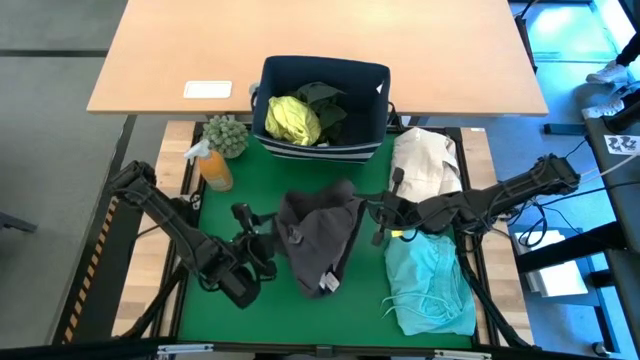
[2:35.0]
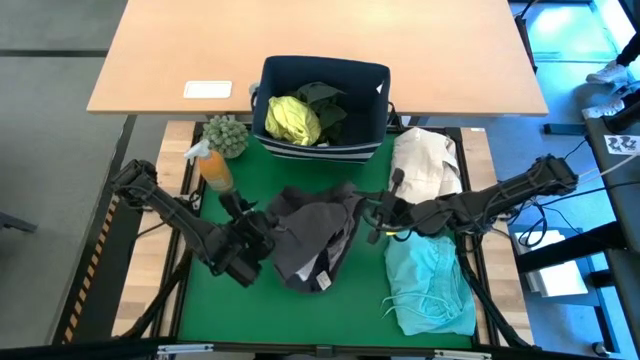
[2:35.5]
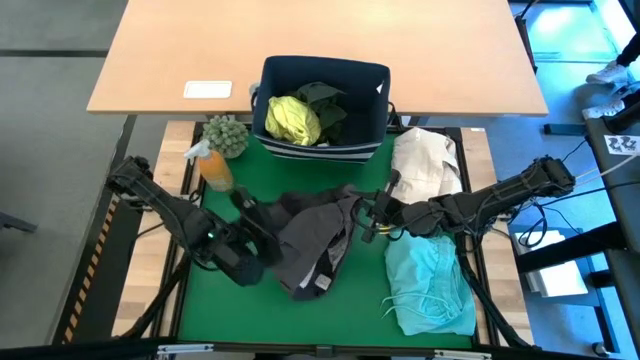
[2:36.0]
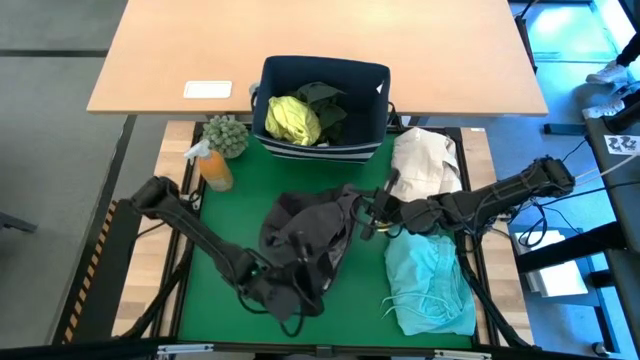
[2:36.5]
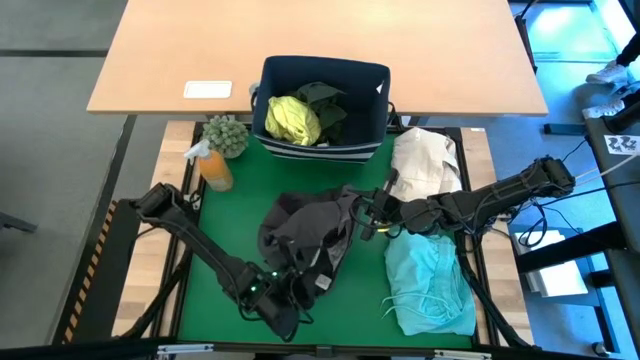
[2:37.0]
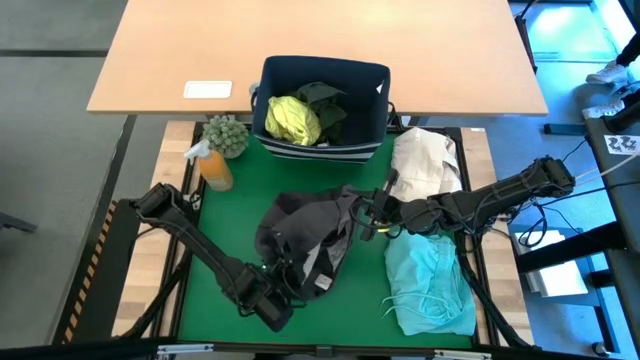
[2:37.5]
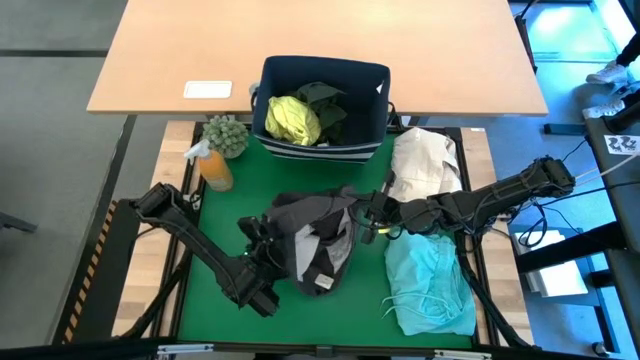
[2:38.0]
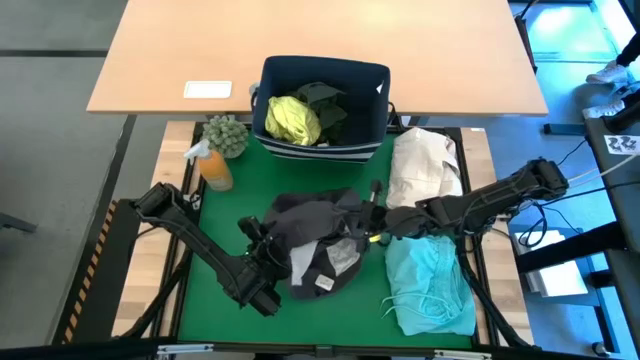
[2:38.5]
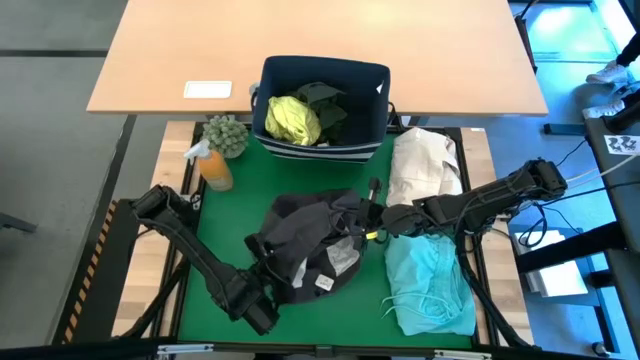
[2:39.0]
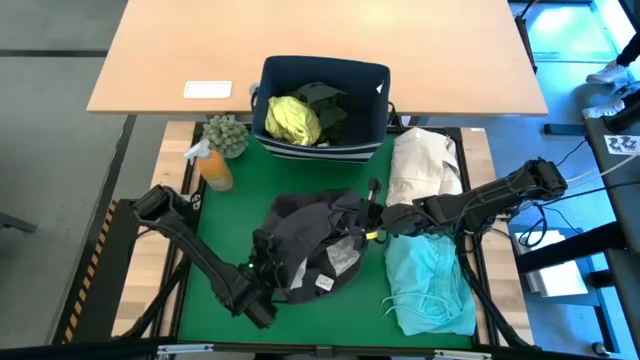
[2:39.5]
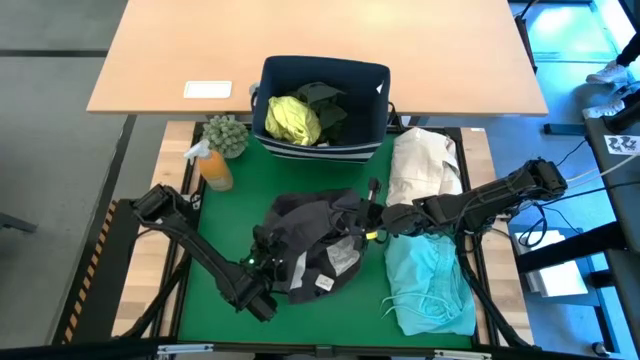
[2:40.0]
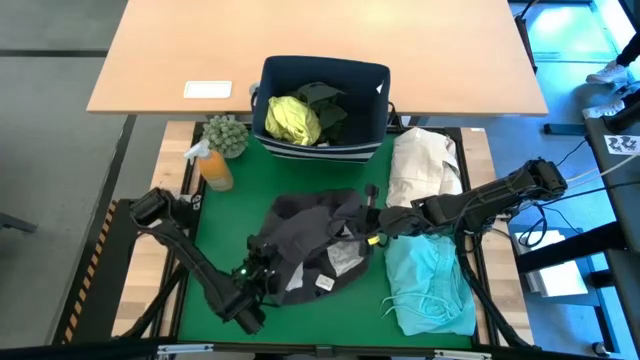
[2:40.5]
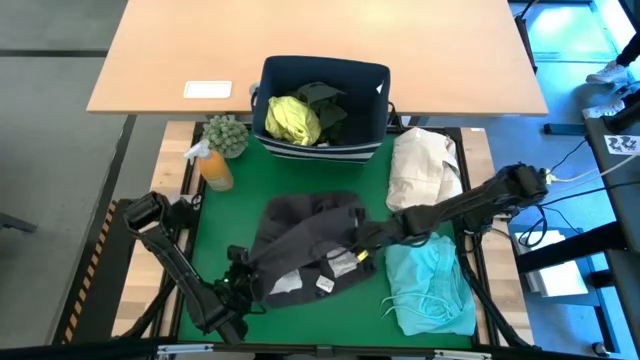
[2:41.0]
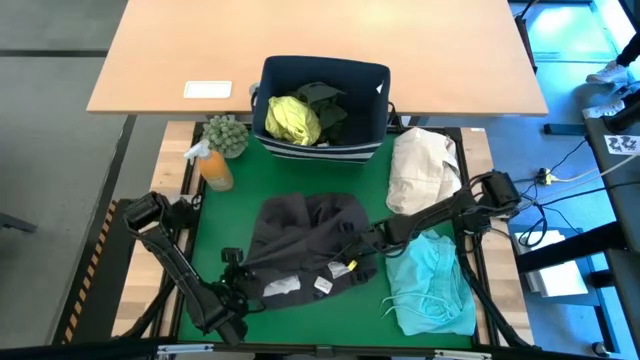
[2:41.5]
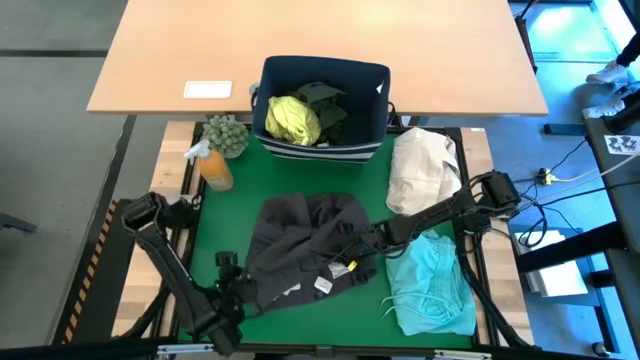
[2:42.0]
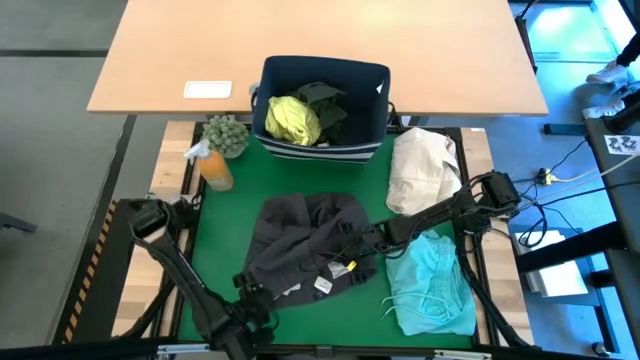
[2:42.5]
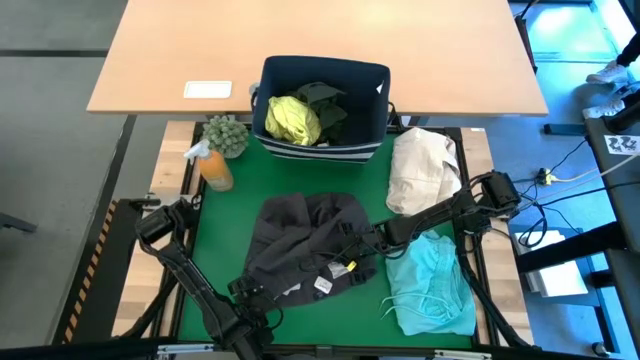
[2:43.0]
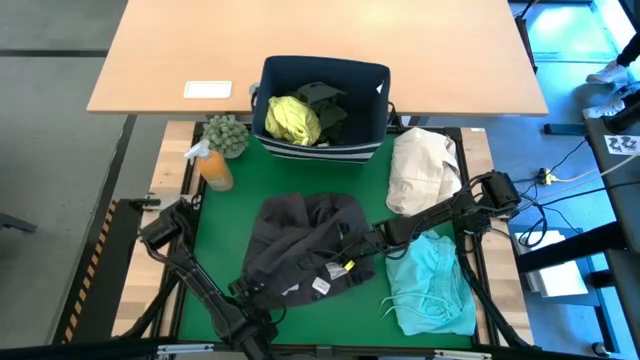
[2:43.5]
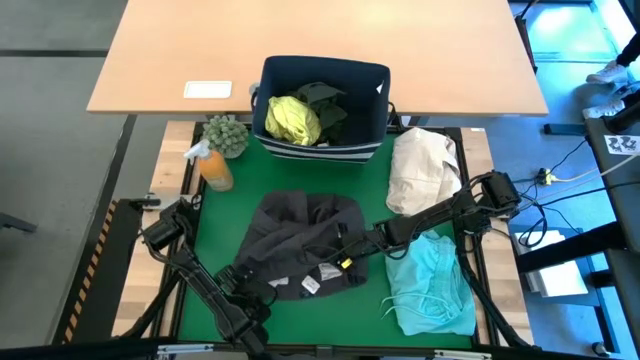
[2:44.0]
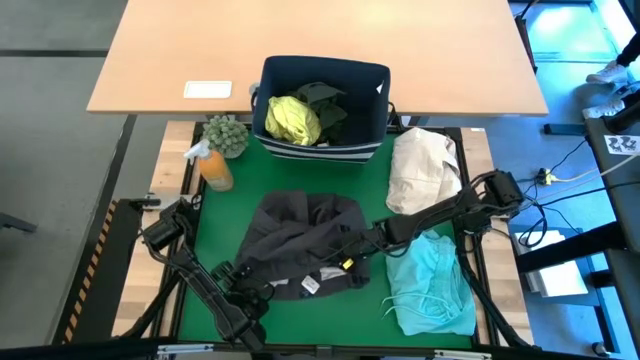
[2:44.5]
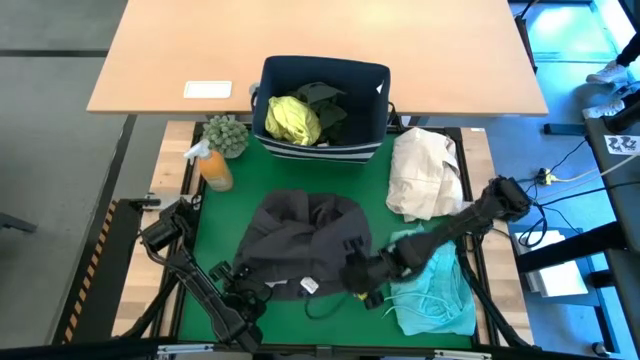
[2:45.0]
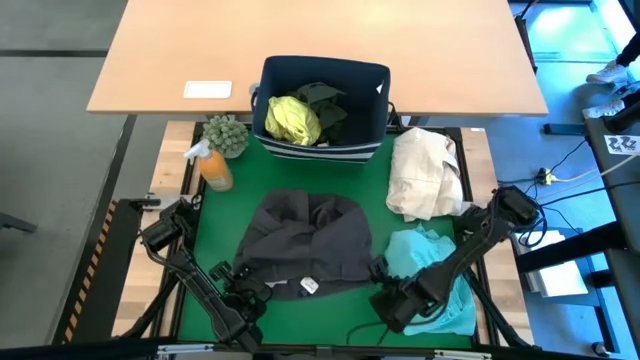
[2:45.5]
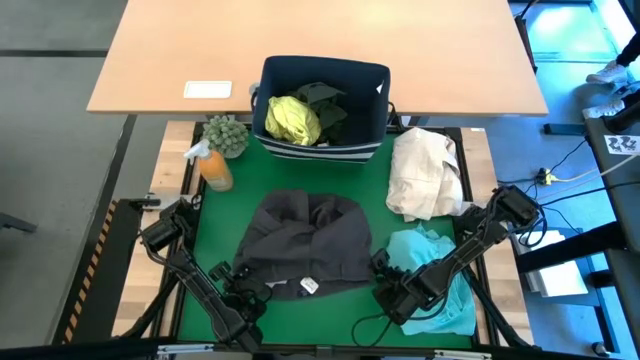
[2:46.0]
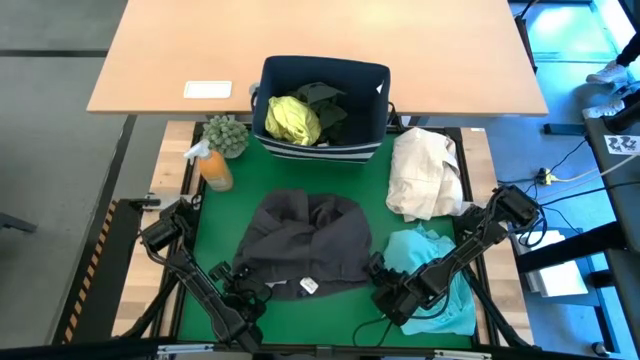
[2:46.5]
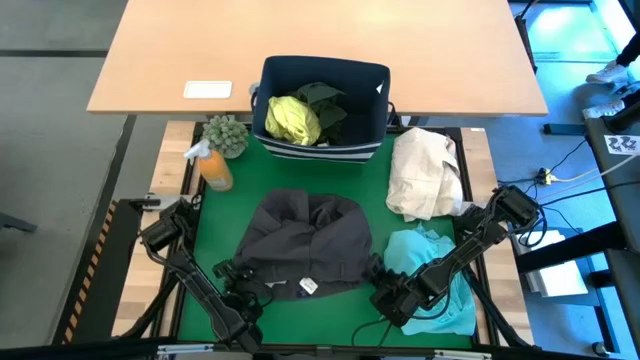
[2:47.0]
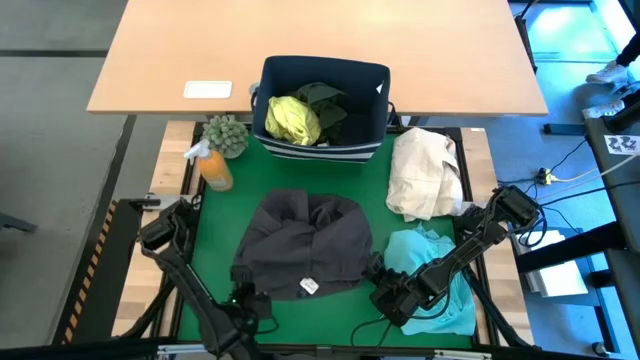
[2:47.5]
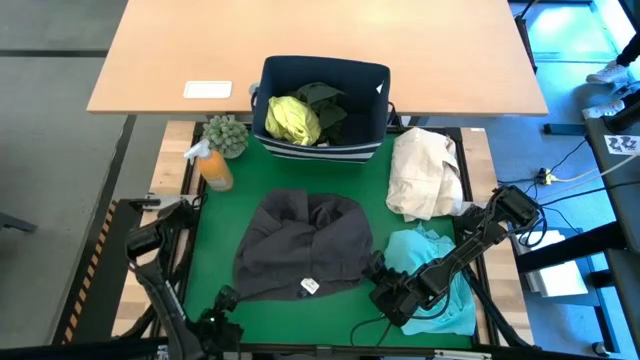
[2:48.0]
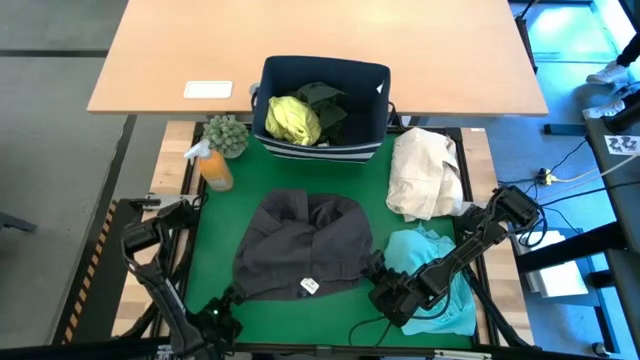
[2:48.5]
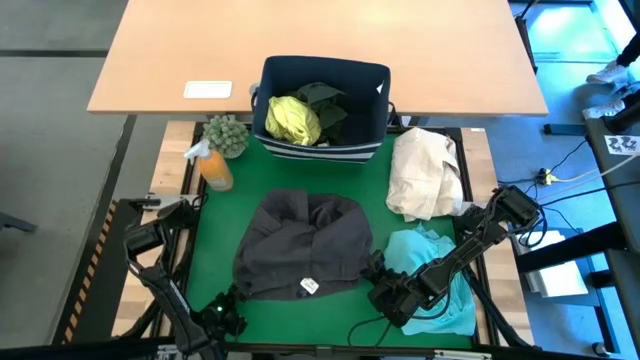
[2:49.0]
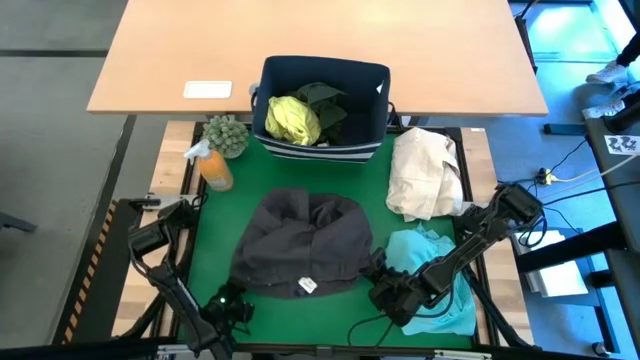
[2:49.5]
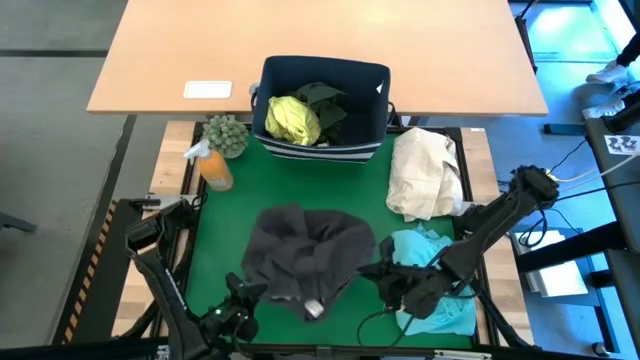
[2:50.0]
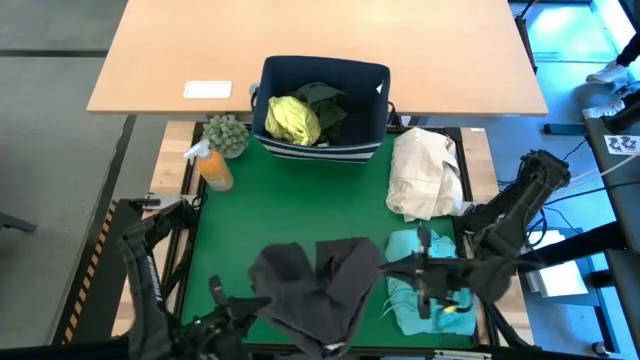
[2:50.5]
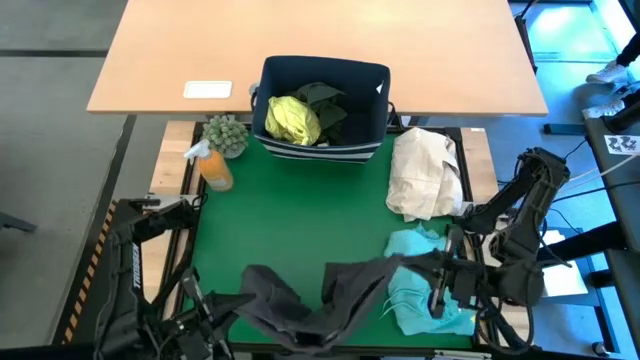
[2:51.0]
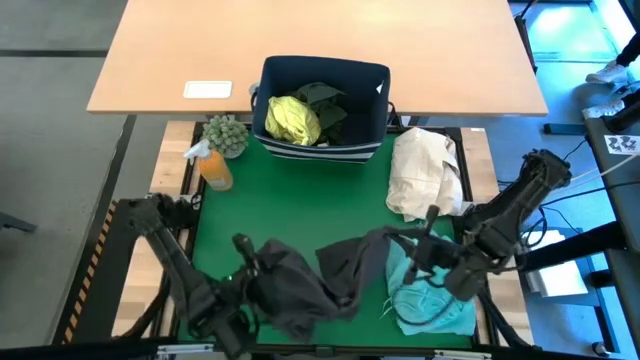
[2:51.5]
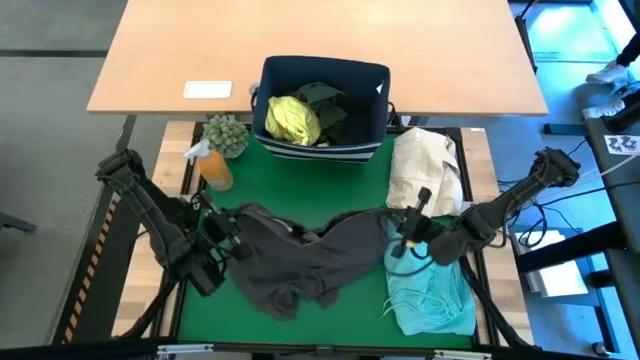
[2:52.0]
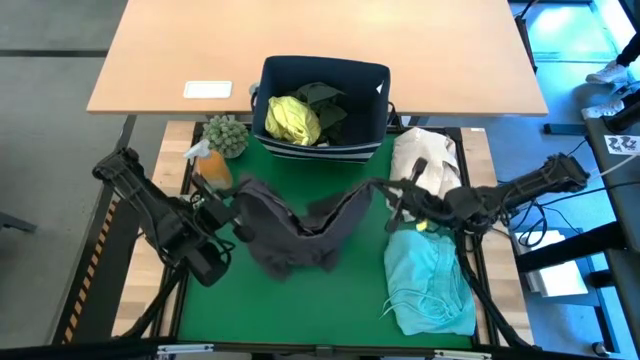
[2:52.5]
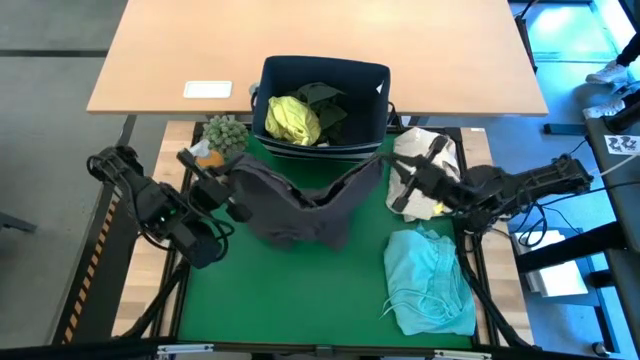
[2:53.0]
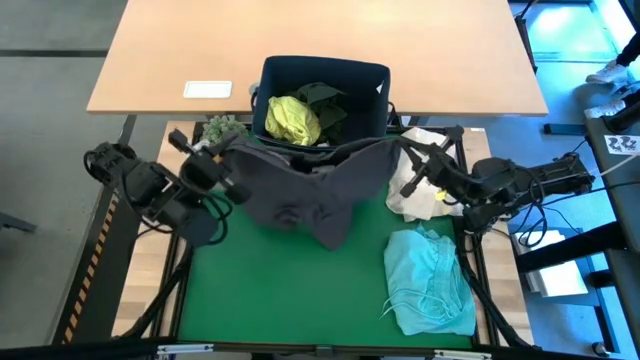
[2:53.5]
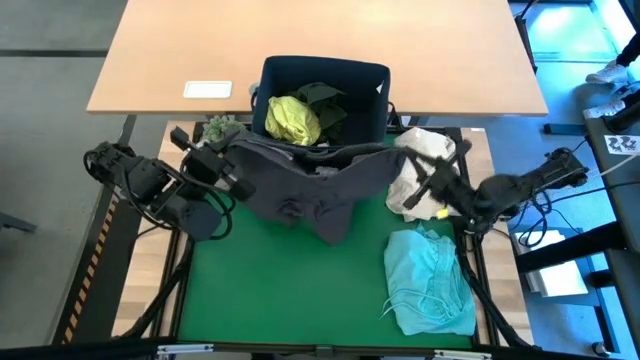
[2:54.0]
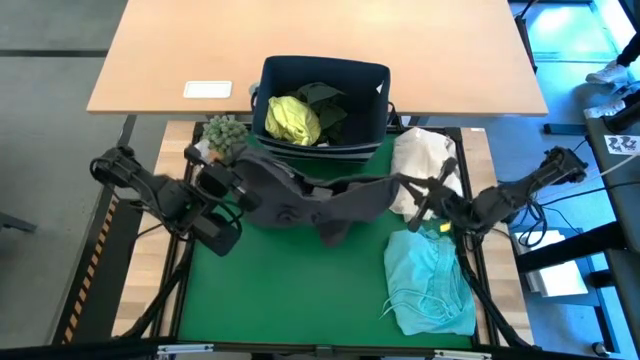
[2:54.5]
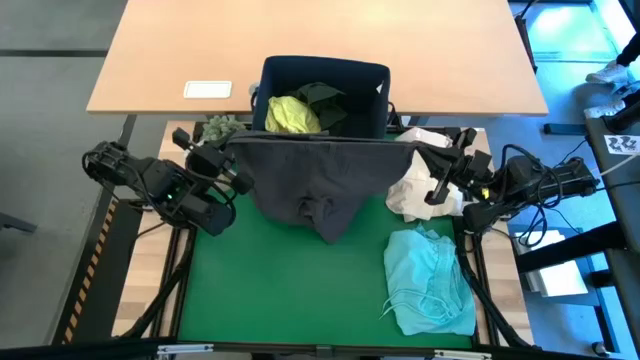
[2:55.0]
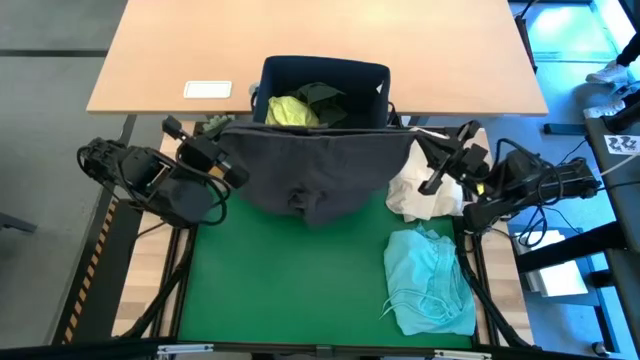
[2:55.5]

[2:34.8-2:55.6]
Task: Fold laundry
Fold the black shorts
